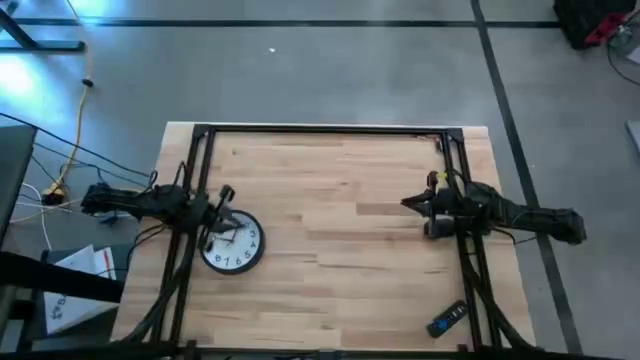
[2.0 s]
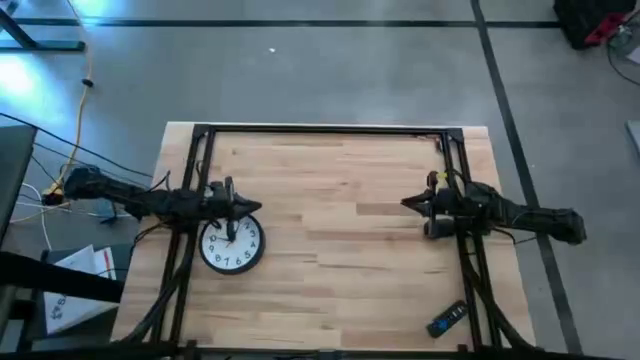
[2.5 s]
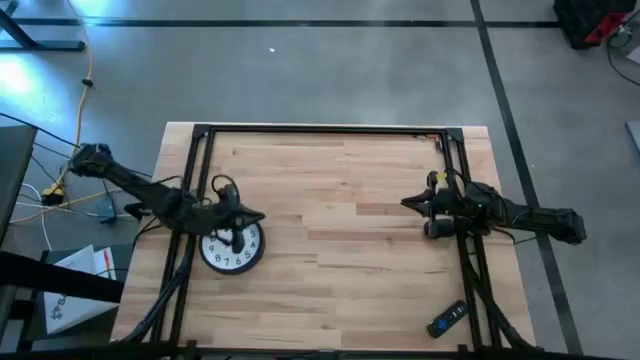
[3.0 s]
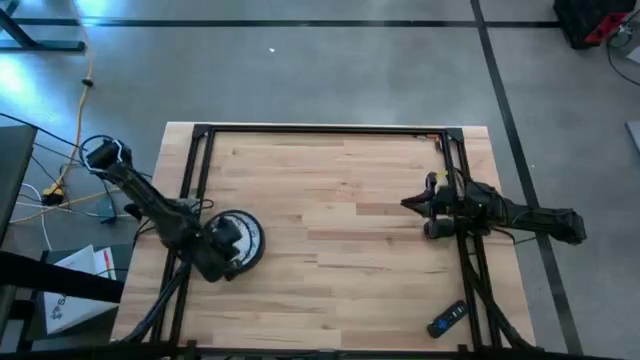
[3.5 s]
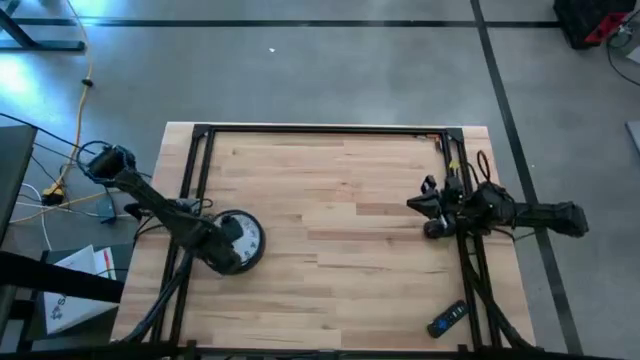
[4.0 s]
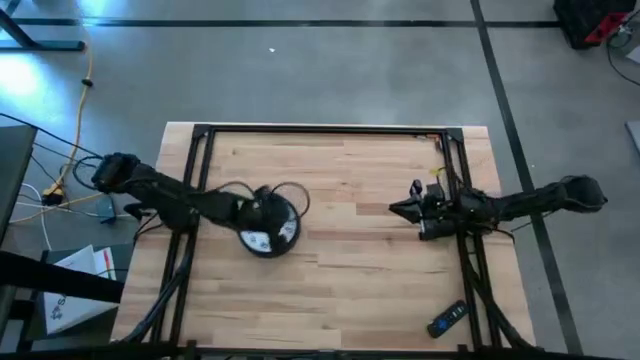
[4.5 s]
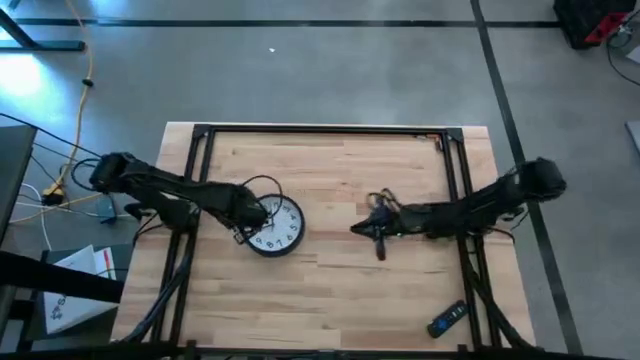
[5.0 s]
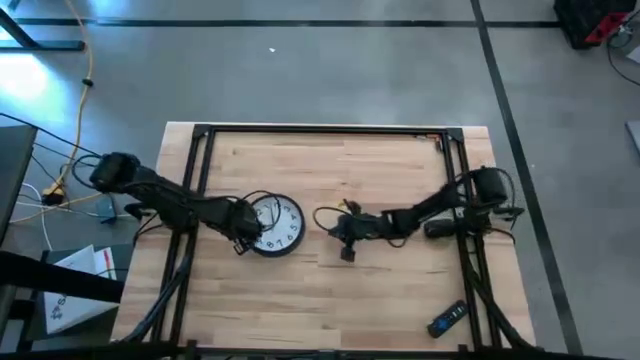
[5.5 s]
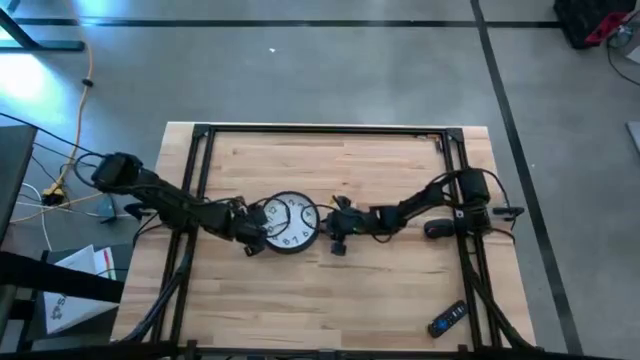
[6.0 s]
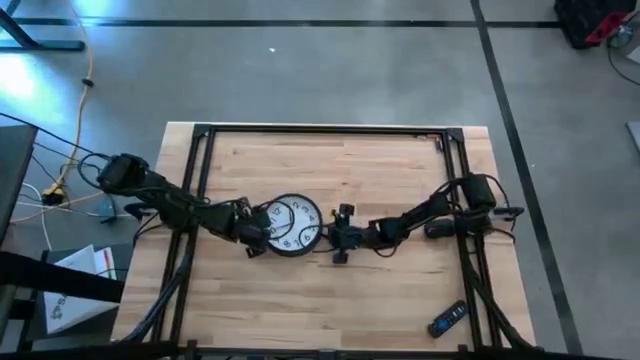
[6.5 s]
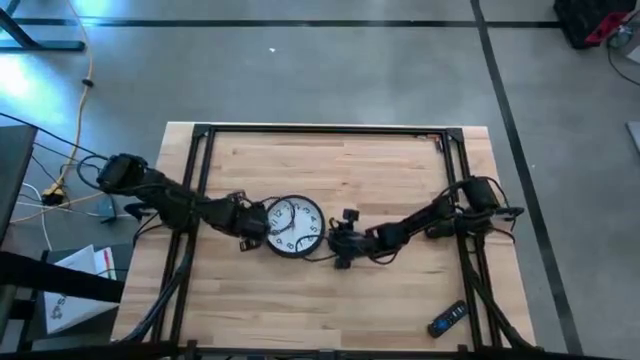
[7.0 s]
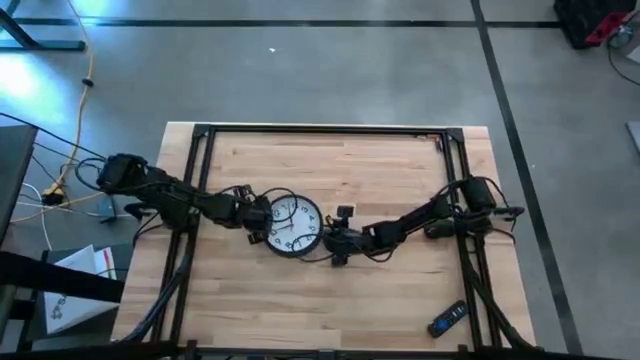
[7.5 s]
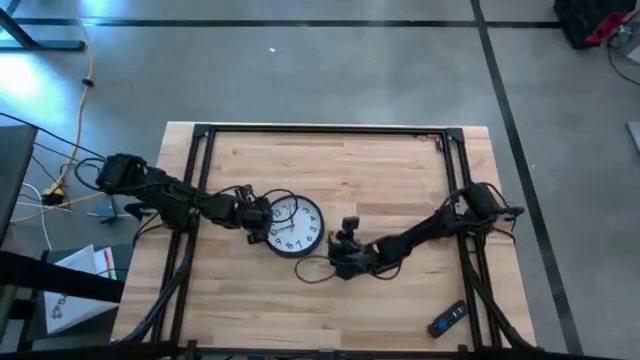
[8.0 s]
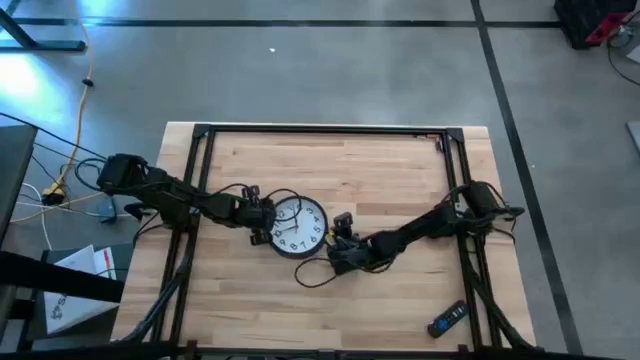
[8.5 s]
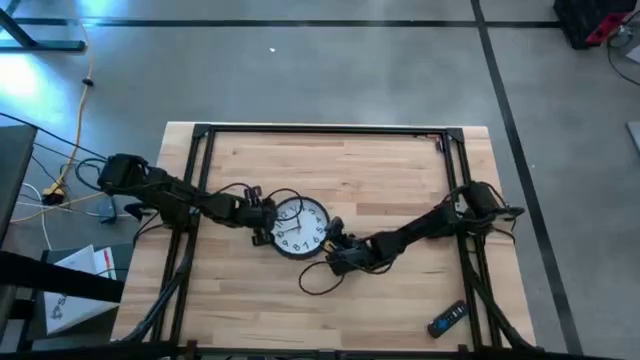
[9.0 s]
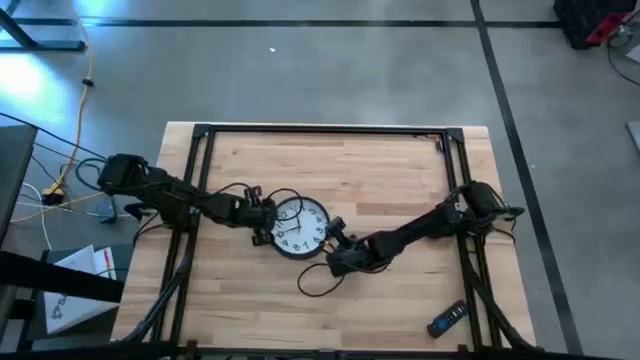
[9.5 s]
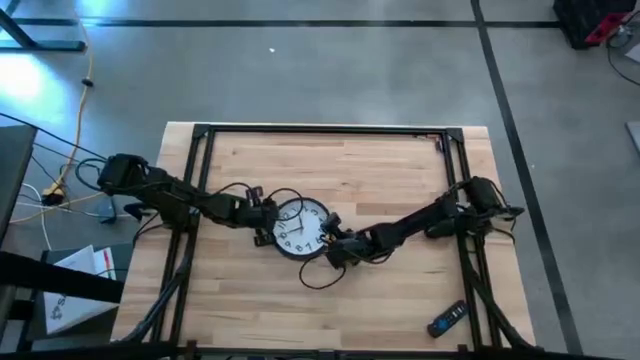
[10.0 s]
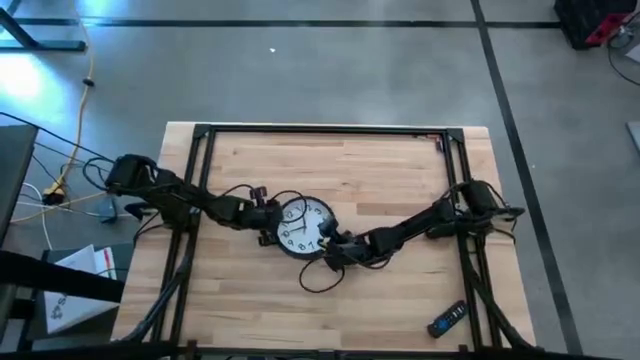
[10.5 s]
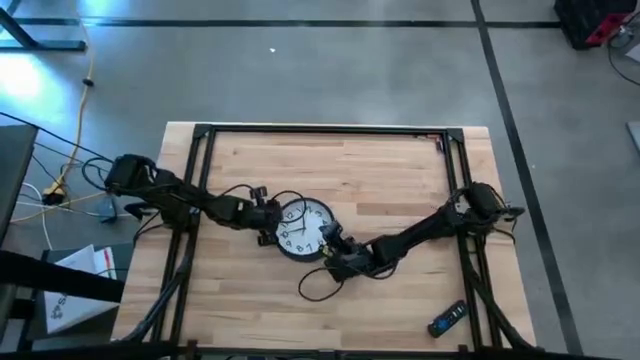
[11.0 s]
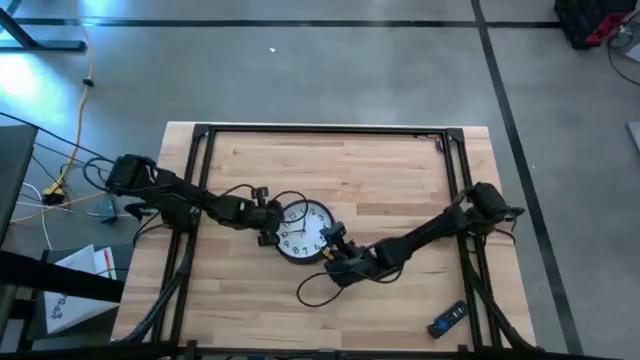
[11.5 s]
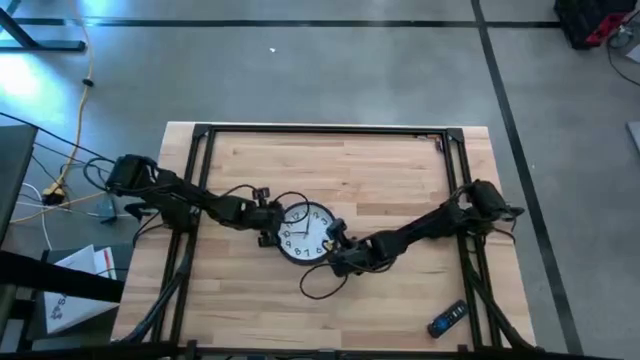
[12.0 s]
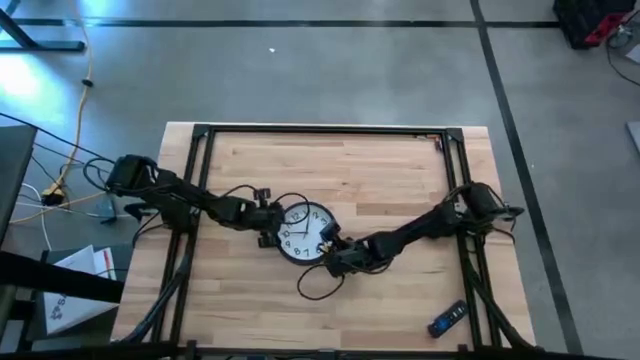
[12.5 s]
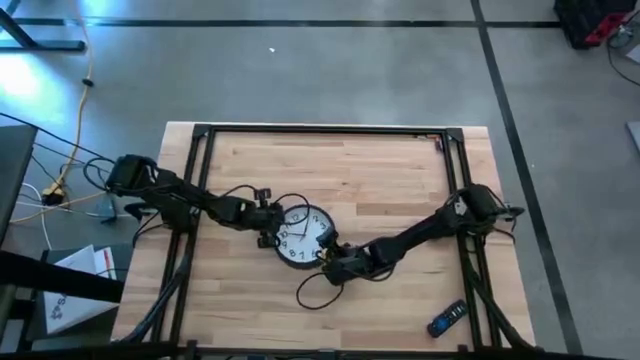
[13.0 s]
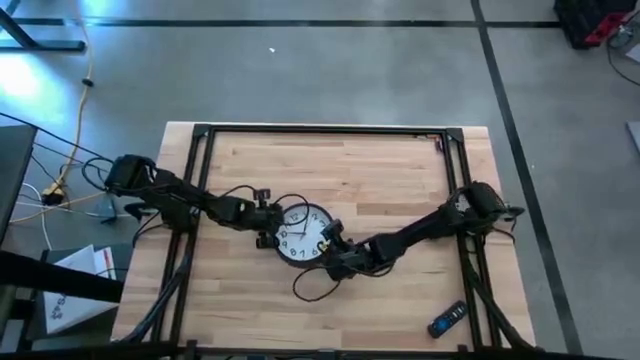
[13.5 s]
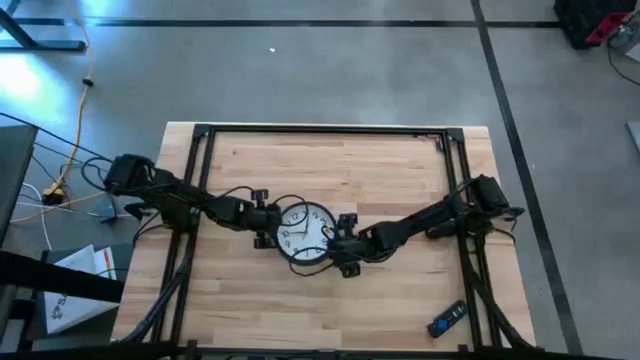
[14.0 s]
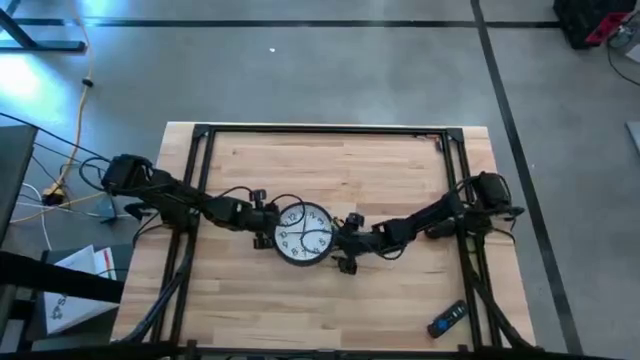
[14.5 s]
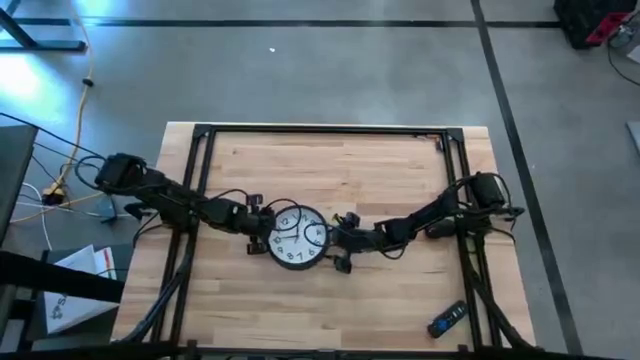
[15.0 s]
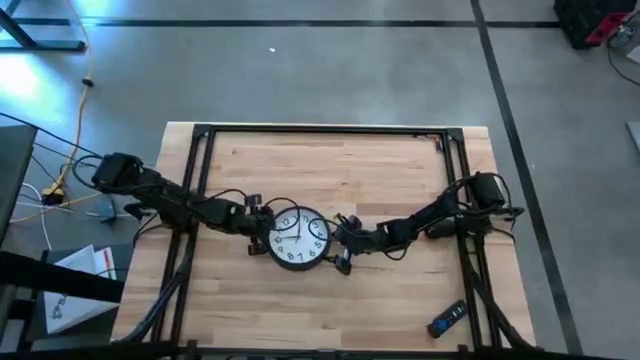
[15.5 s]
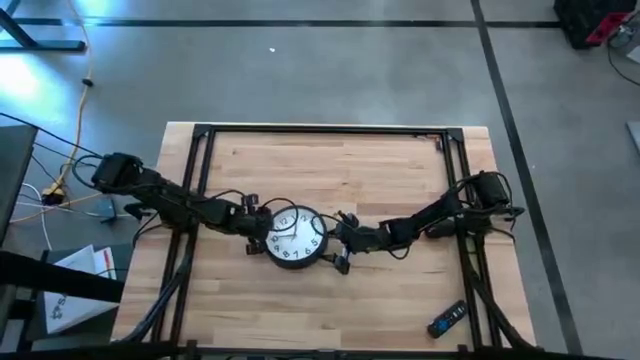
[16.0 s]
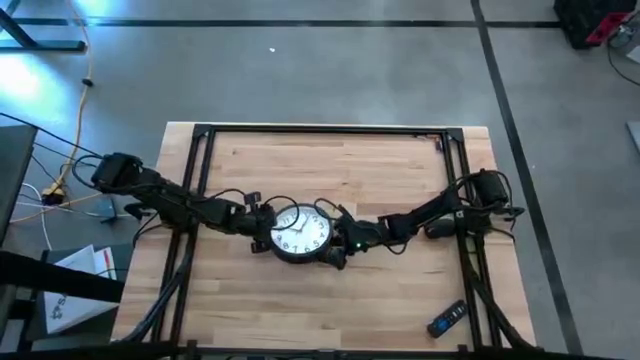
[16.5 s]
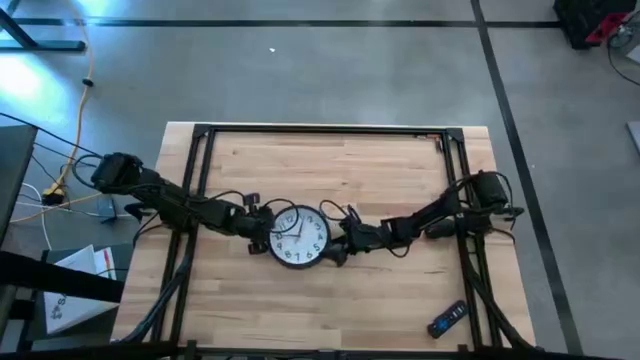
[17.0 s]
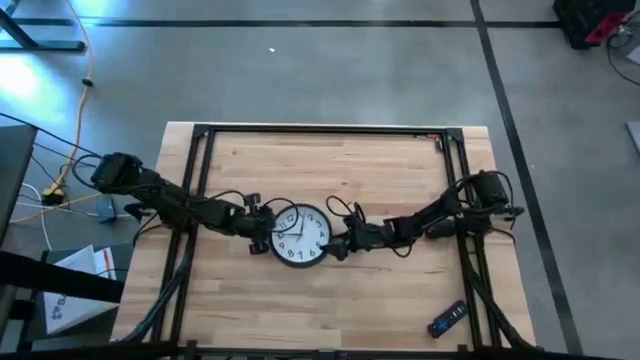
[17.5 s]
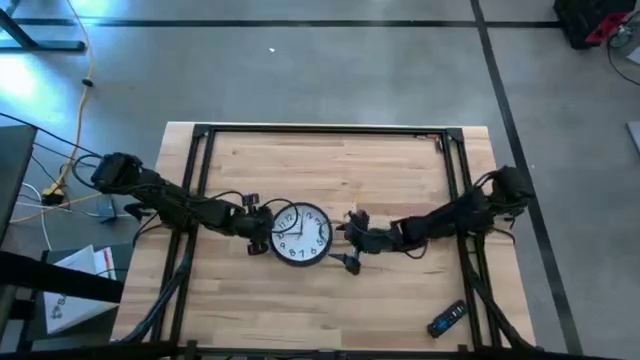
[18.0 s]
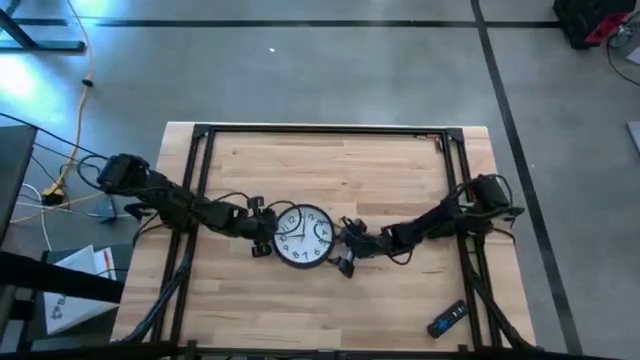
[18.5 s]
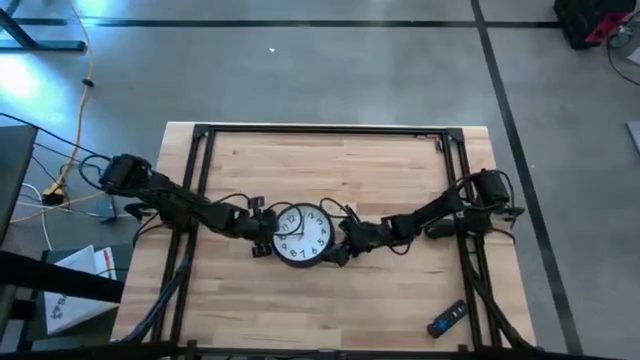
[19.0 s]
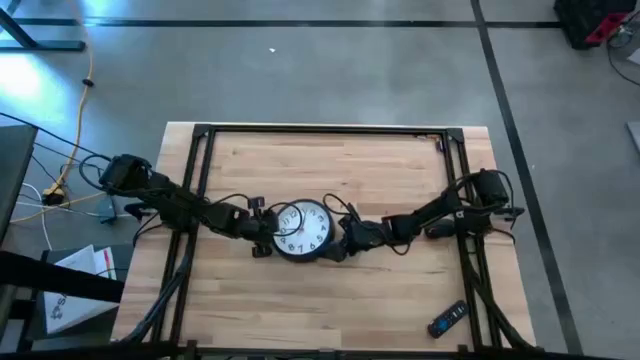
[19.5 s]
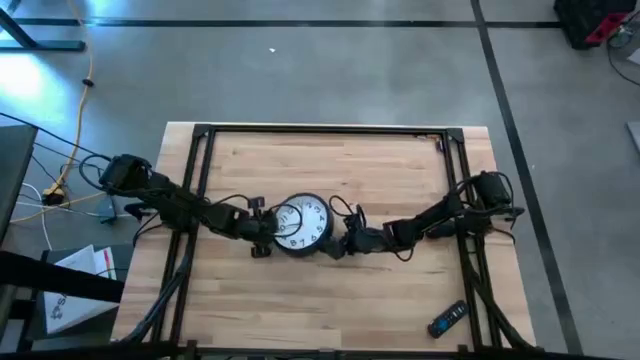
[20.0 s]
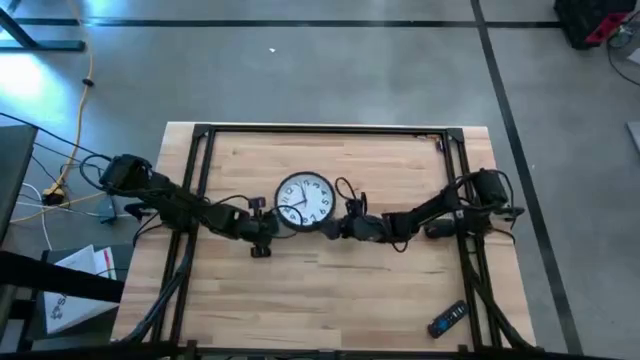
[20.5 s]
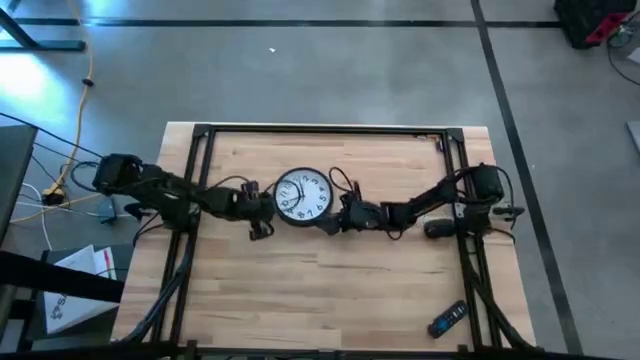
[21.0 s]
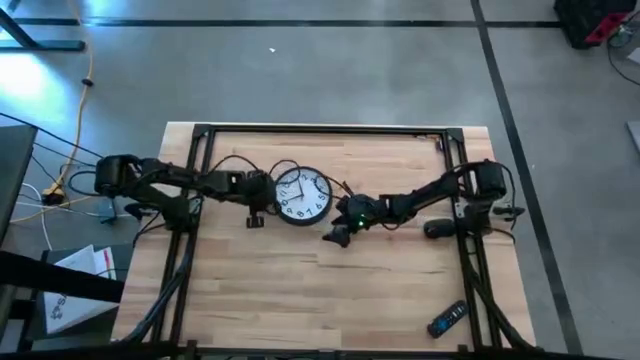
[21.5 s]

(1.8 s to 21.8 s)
Task: Insert battery
Insert the yellow battery into the white-black wall clock
